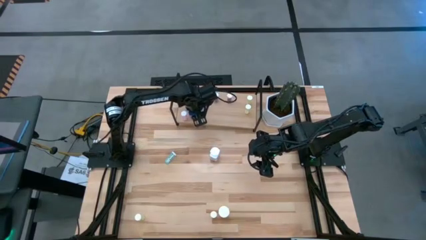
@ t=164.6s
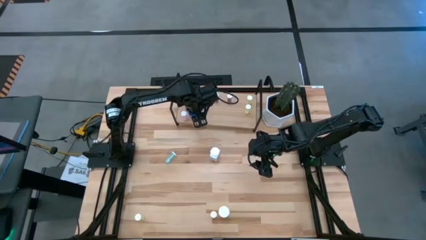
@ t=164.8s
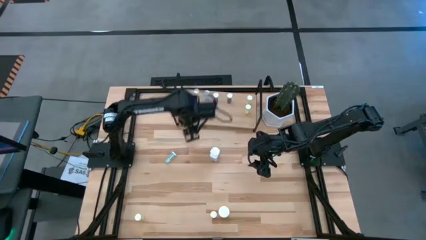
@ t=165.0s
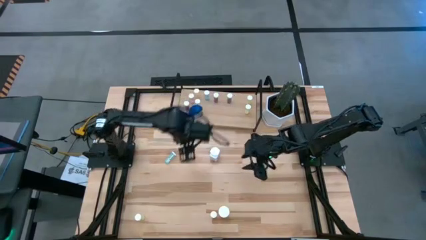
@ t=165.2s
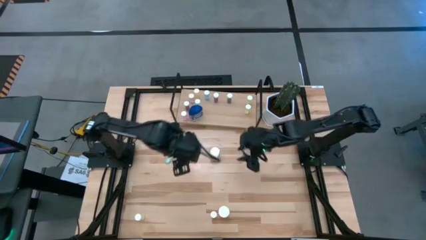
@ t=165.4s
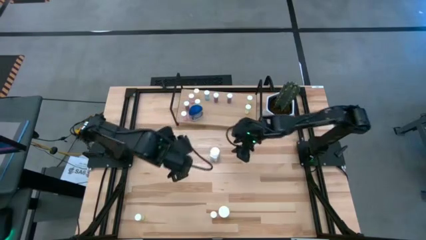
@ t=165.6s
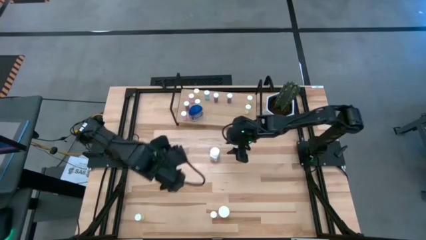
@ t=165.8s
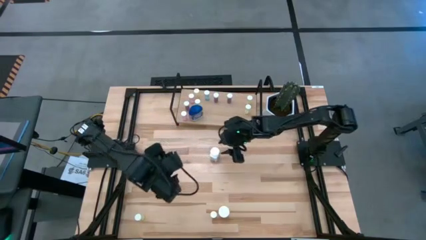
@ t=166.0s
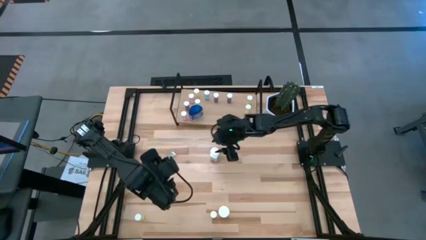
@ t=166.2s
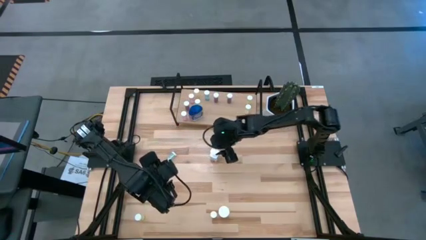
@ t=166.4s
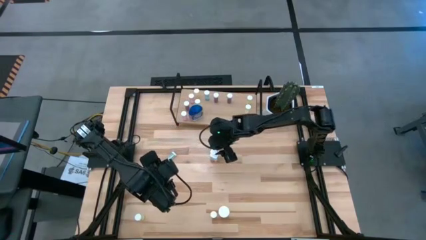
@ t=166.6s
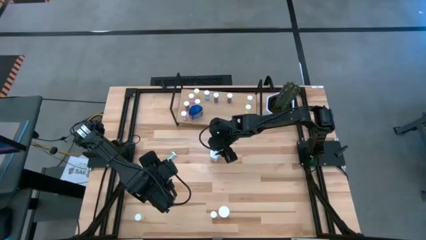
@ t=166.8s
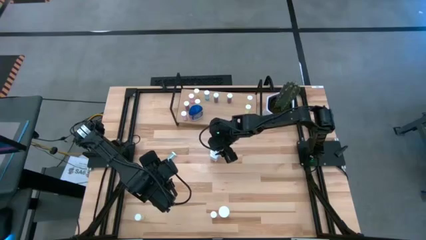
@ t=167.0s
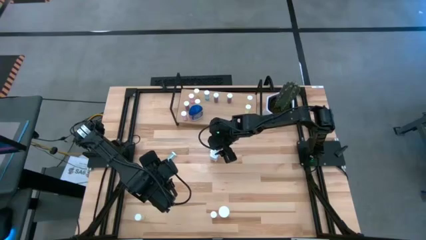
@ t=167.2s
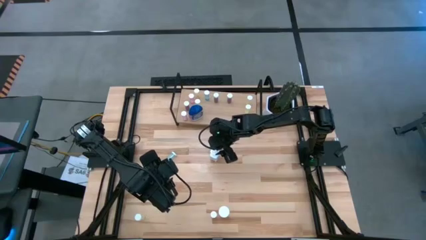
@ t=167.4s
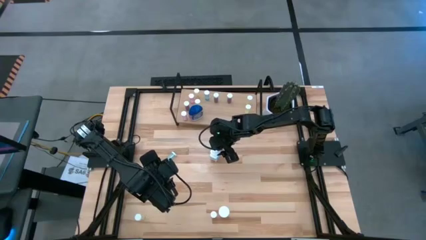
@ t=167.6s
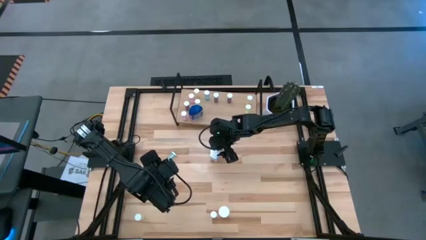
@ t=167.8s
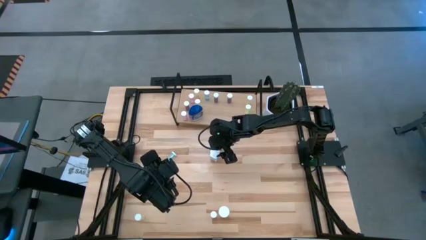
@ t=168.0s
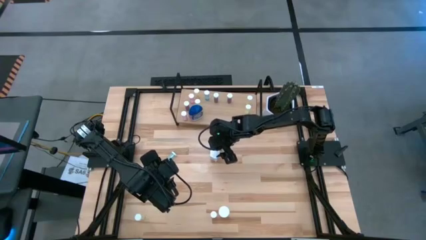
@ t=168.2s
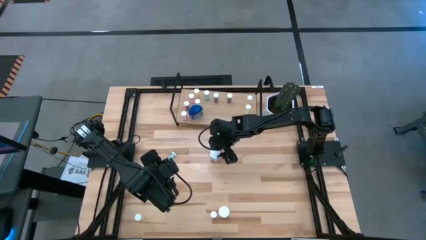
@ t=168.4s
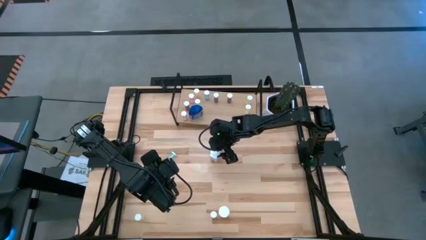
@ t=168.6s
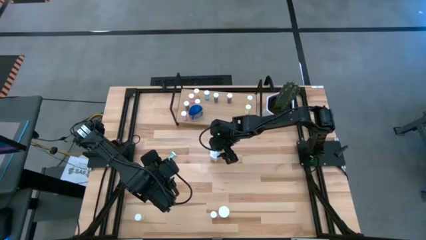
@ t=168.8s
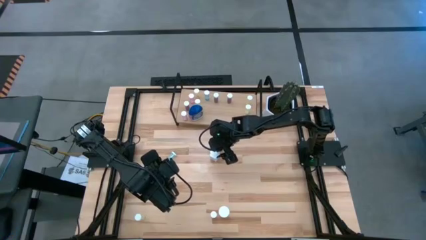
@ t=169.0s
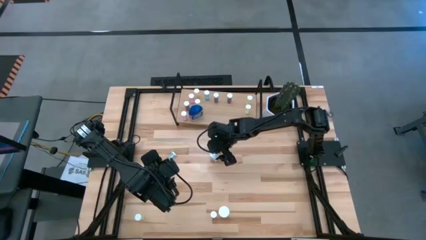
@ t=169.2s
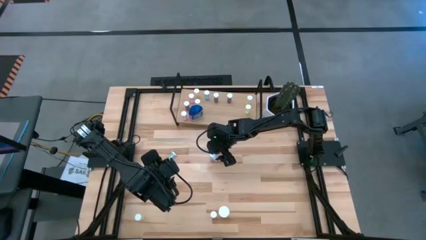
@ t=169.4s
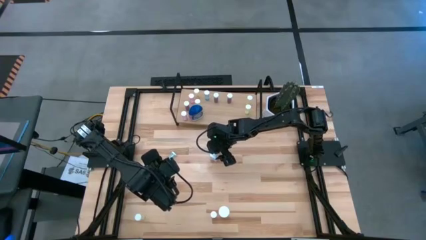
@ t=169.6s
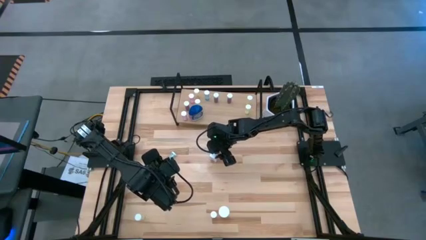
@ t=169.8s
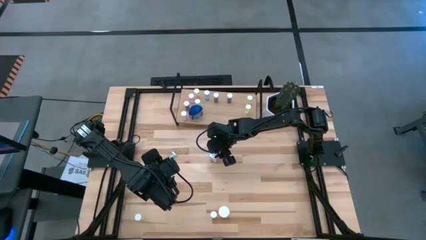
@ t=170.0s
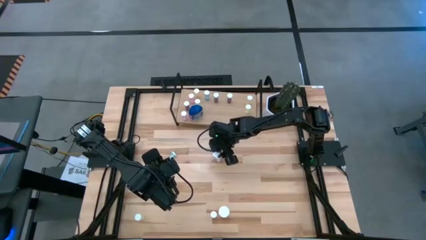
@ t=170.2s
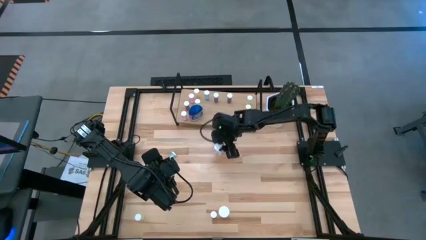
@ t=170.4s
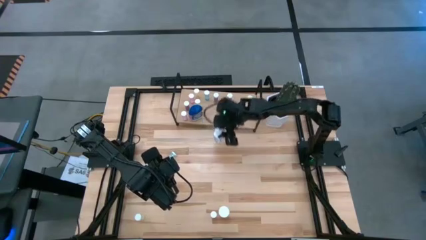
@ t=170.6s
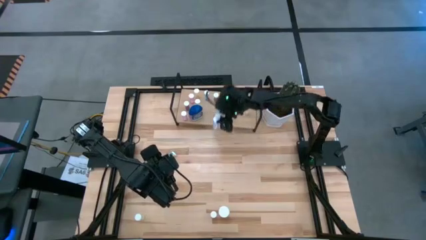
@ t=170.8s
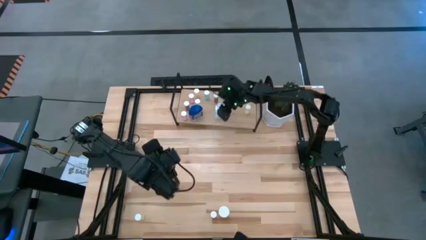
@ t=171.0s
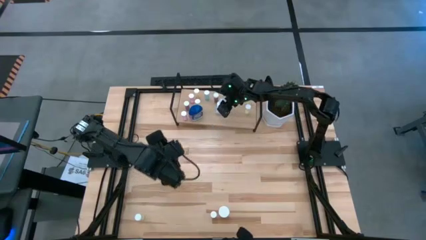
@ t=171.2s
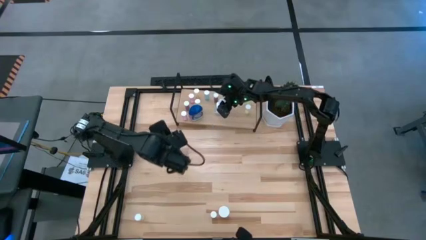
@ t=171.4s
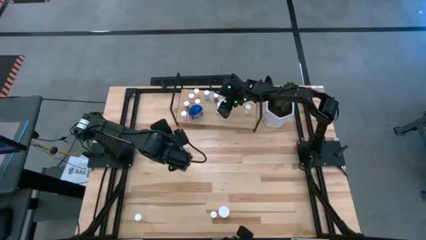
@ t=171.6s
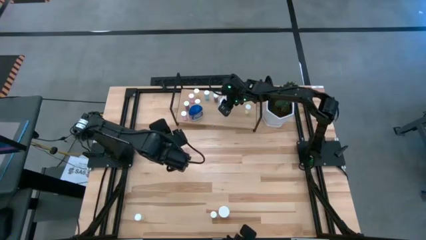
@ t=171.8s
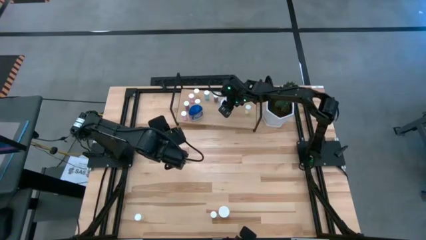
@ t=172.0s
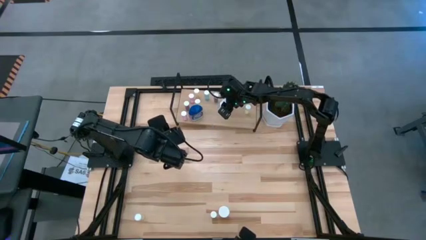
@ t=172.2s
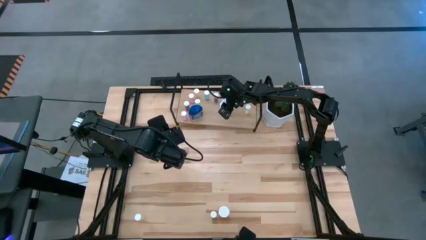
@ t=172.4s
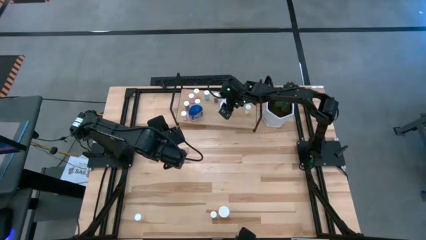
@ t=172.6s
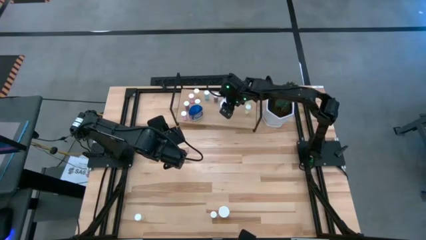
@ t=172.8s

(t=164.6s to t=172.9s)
Task: Pick and place medicine bottles onto shelf by color
Put the white pill bottle on the shelf

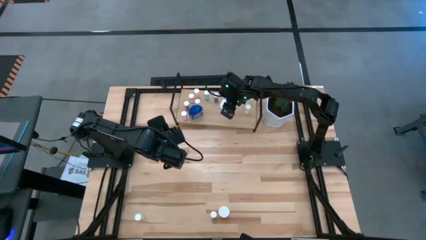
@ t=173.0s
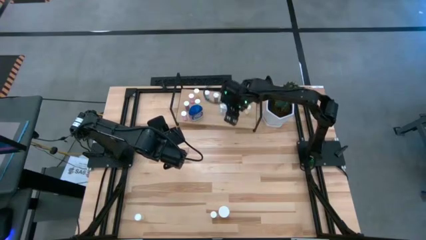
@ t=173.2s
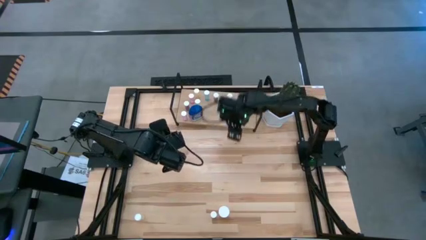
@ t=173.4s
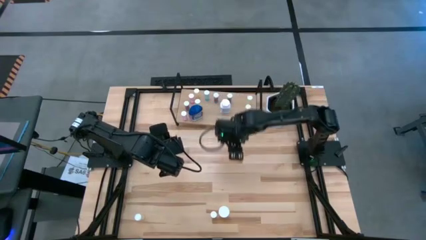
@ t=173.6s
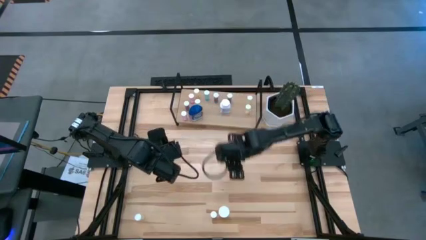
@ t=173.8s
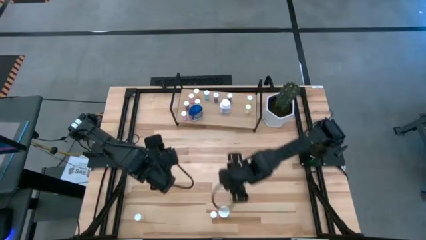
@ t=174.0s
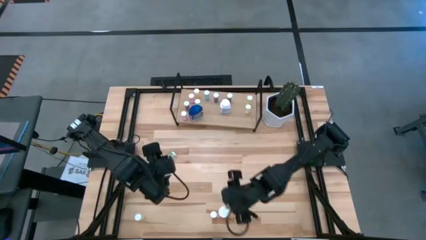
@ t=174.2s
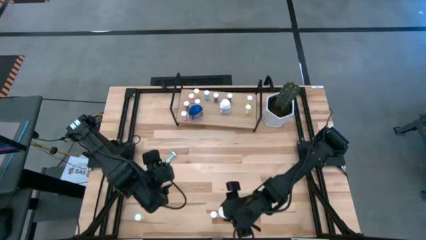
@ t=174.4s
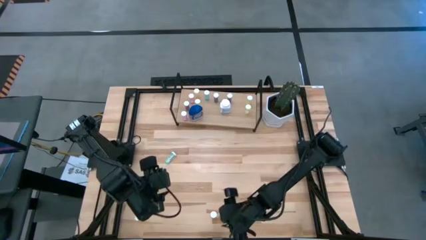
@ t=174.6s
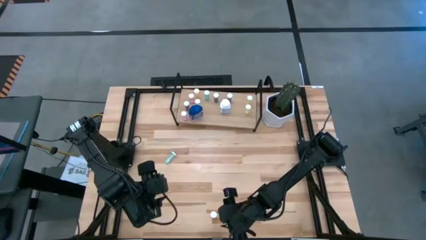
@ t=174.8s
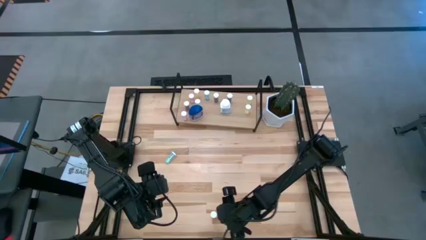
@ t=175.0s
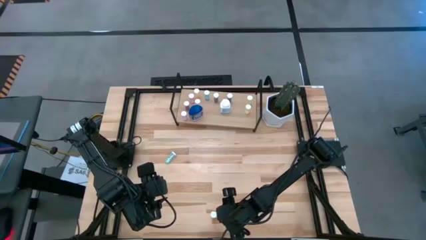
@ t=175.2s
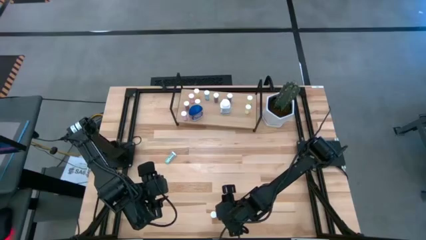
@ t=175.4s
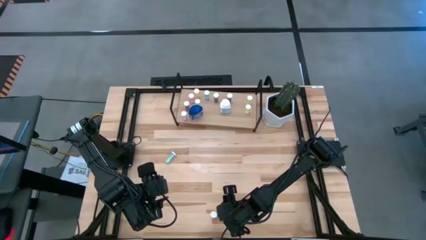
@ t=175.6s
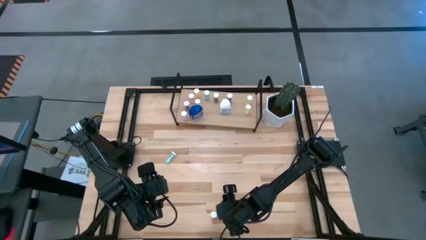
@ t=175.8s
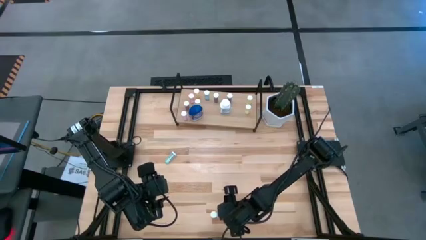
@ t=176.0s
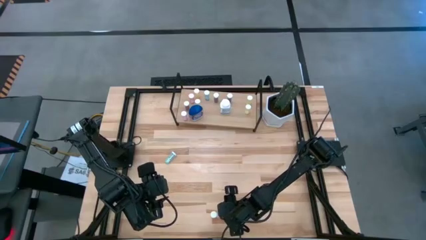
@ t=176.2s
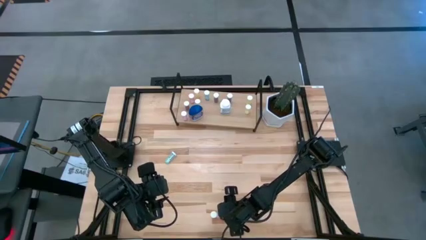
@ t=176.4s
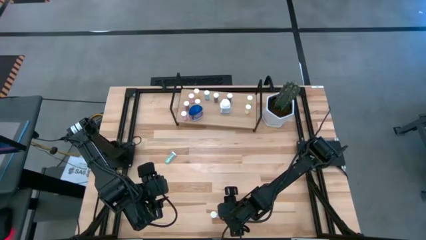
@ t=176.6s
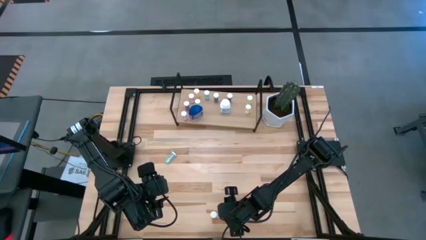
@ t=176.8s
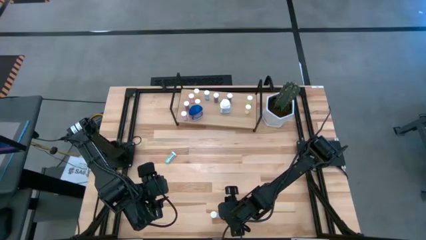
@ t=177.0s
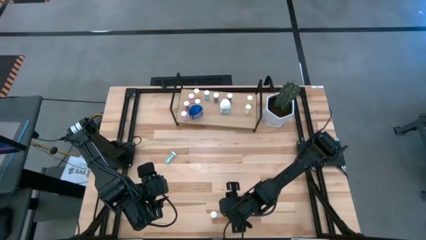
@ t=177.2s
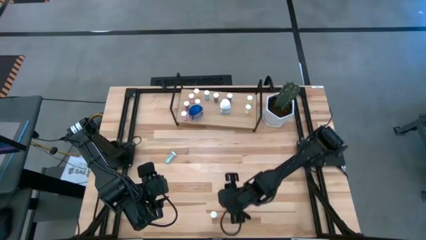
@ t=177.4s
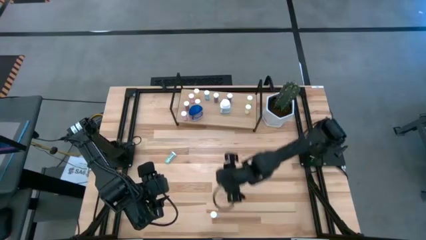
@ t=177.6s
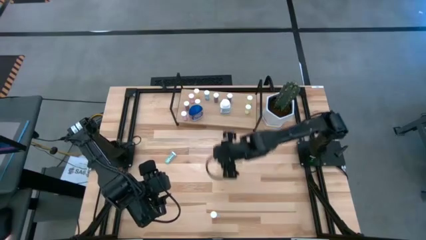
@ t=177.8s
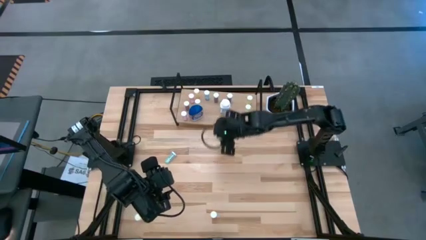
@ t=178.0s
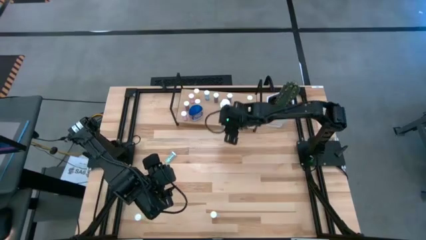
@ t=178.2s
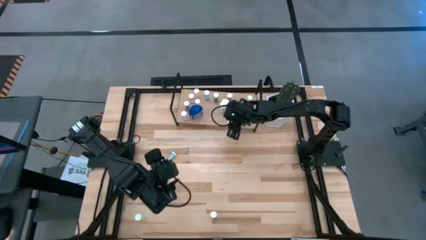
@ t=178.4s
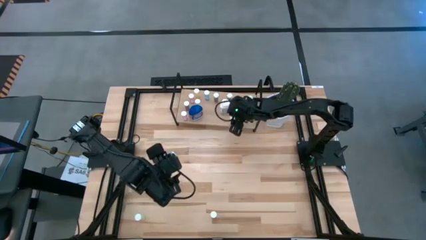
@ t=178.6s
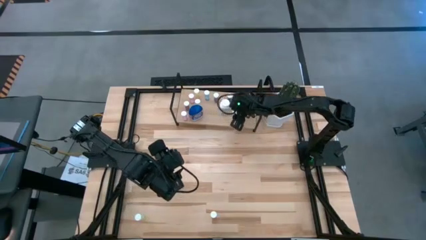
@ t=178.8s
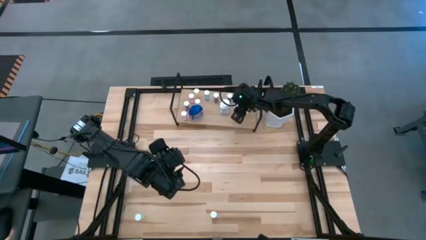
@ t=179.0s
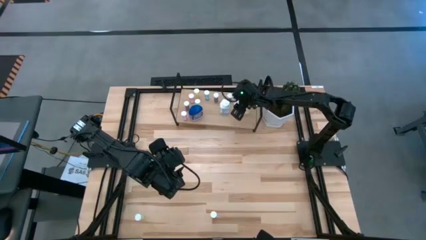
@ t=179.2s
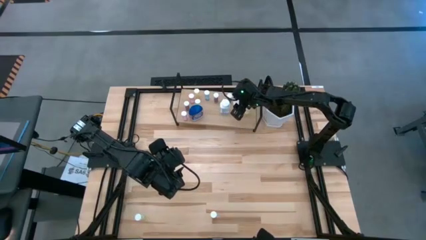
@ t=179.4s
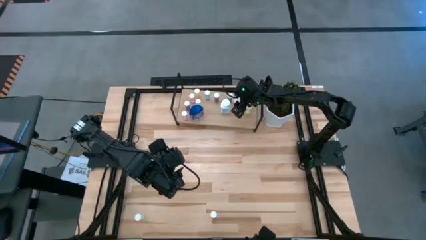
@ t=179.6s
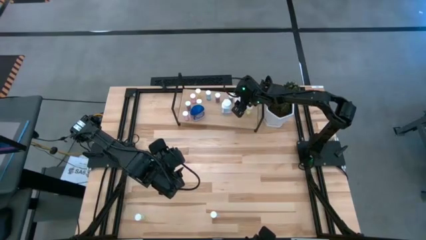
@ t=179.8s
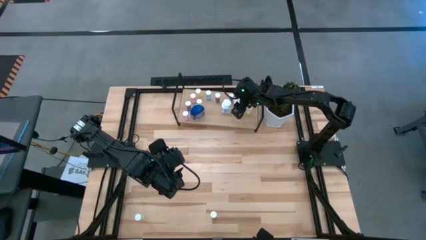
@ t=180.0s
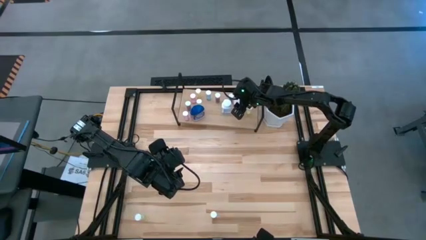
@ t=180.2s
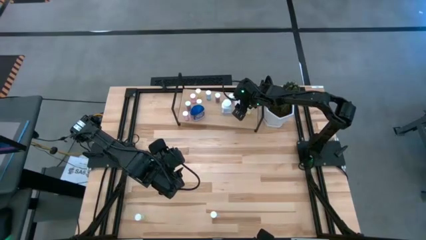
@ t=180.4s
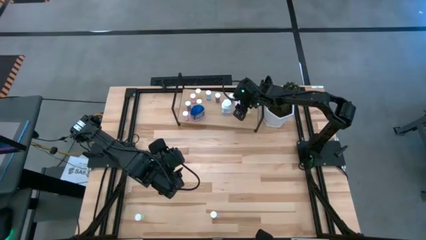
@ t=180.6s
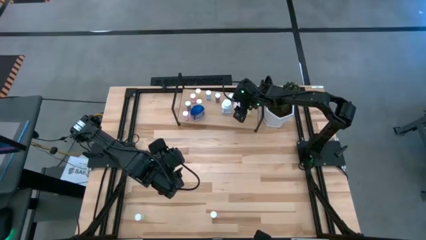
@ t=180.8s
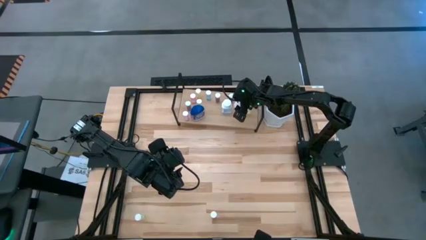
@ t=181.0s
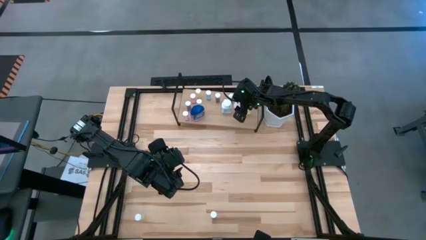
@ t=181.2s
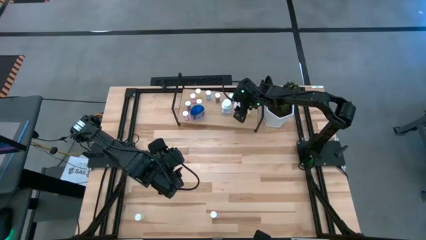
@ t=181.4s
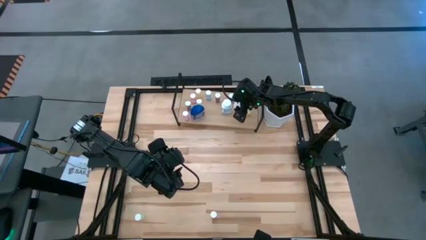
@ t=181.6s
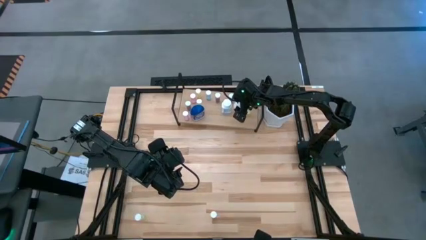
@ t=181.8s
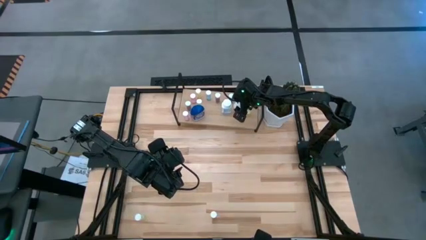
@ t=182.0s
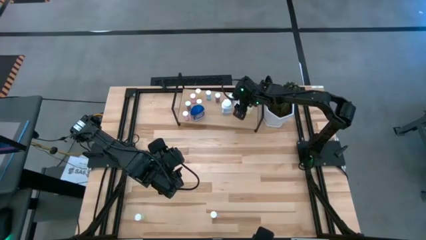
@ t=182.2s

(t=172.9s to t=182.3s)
Put the orange pill bottle on the shelf
